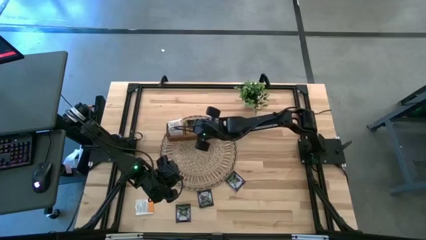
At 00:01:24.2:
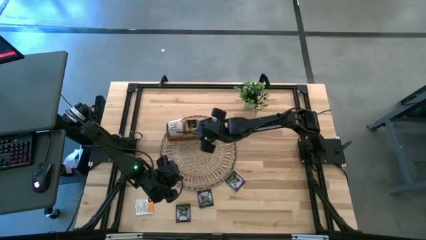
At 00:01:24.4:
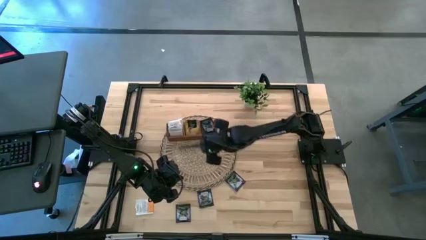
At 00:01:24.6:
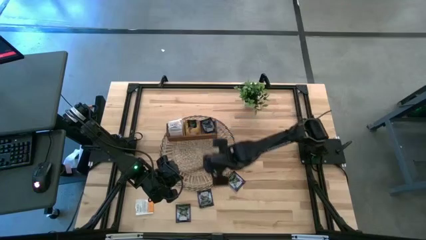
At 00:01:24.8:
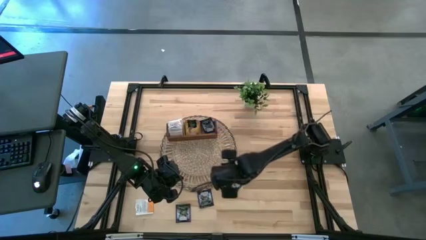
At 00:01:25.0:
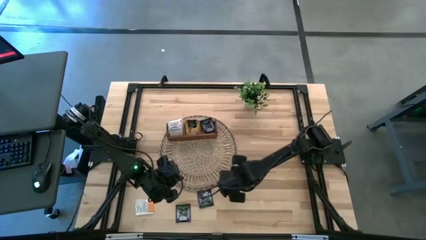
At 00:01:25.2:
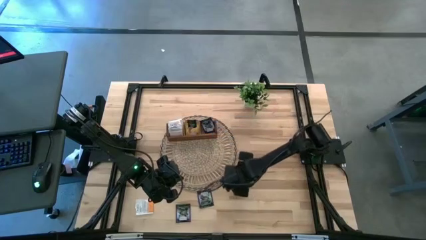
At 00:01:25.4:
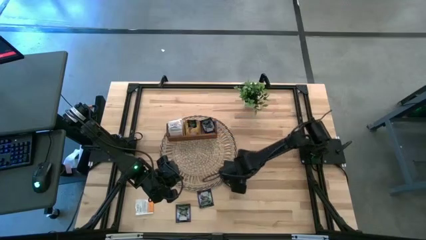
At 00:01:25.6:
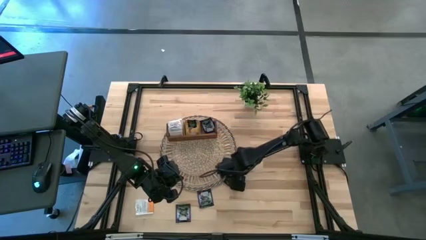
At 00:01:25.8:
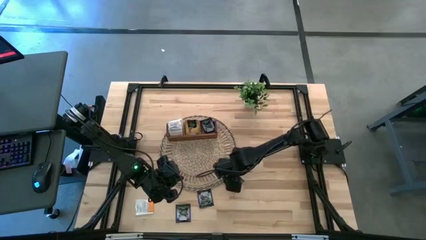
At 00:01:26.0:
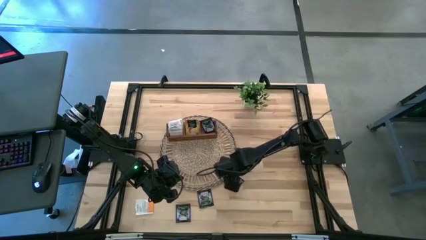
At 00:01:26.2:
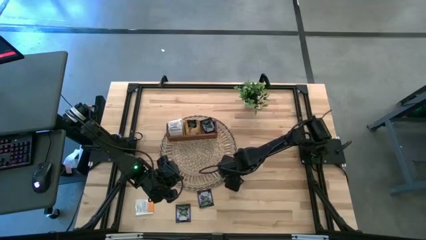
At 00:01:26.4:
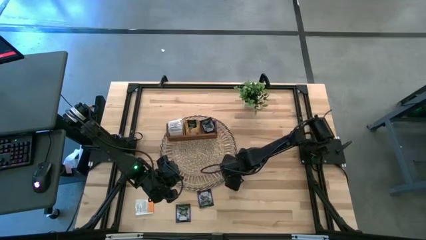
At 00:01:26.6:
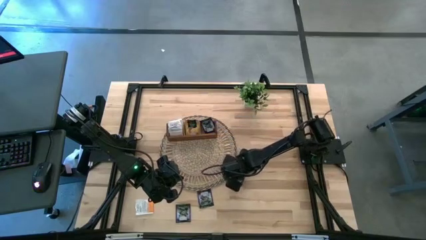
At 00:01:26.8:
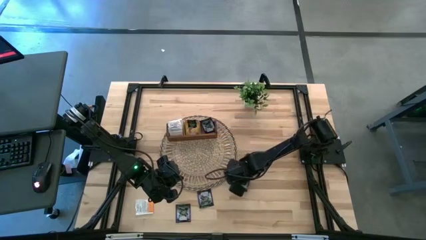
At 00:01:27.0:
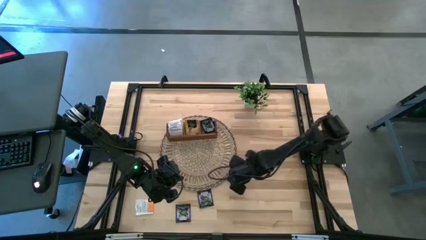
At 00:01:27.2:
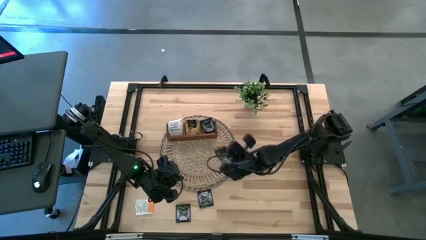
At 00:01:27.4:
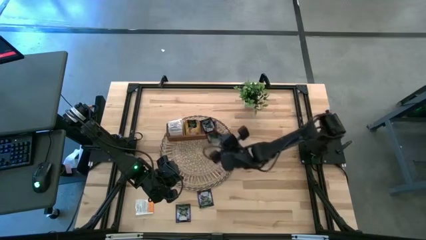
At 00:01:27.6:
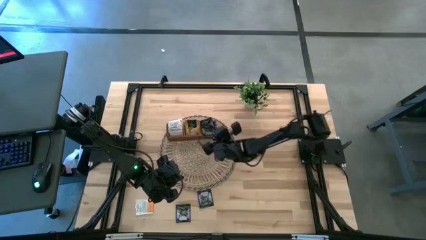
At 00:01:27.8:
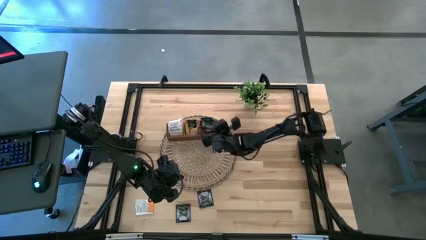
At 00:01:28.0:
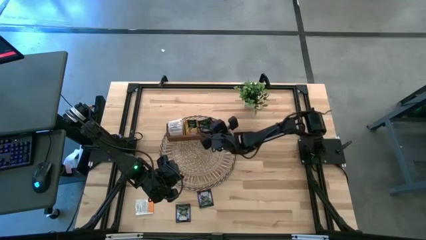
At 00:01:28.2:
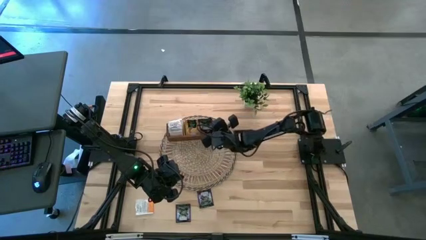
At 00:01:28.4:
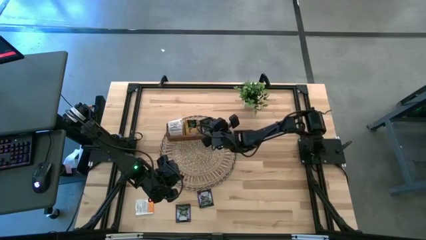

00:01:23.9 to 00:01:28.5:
Task: Pick & Place Tea
Put the violet tea packet into the right compartment of the wooden organizer

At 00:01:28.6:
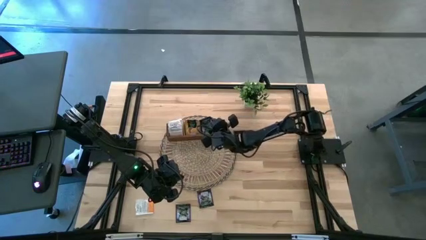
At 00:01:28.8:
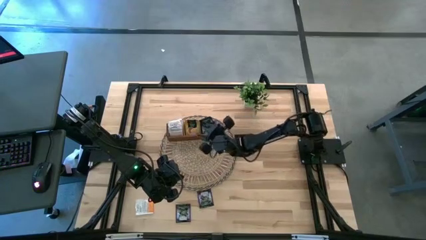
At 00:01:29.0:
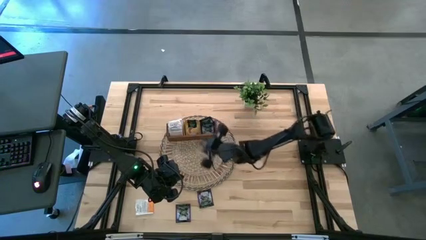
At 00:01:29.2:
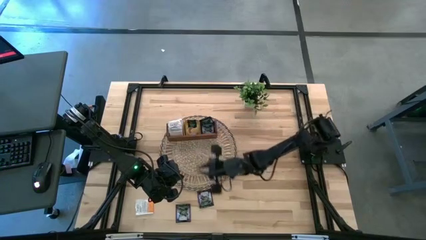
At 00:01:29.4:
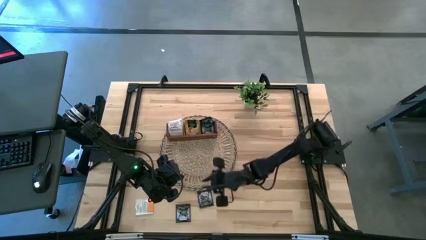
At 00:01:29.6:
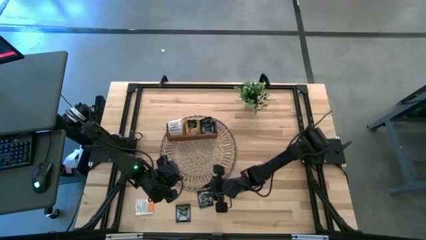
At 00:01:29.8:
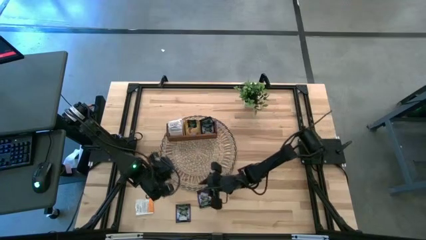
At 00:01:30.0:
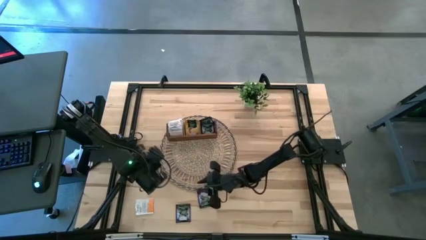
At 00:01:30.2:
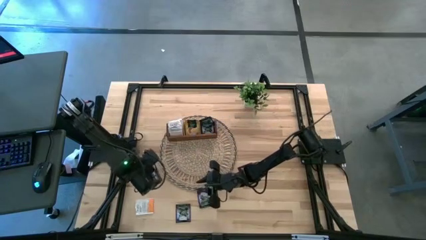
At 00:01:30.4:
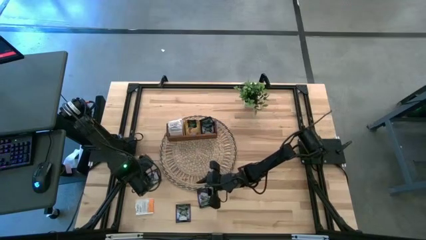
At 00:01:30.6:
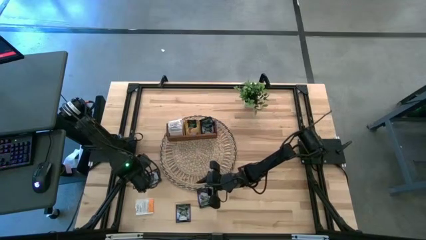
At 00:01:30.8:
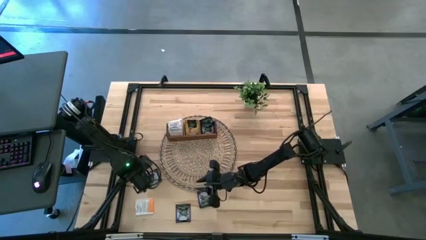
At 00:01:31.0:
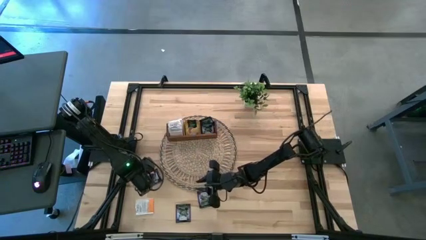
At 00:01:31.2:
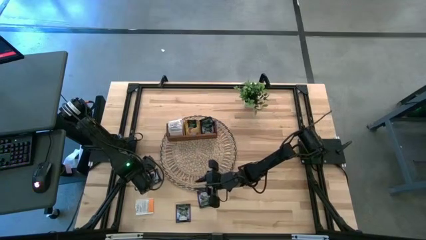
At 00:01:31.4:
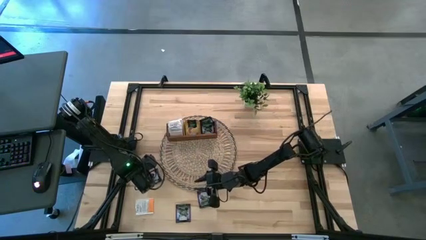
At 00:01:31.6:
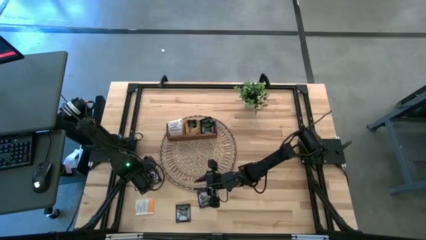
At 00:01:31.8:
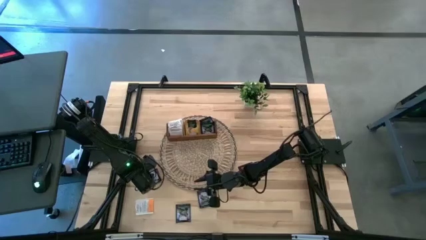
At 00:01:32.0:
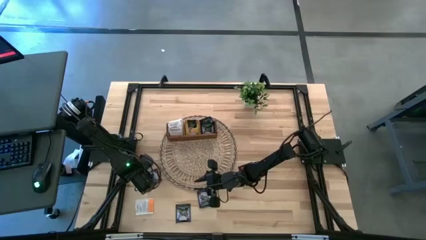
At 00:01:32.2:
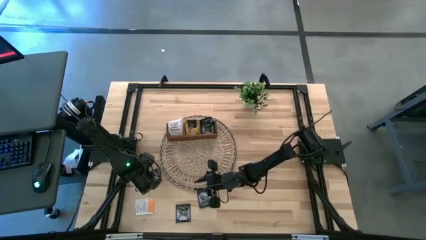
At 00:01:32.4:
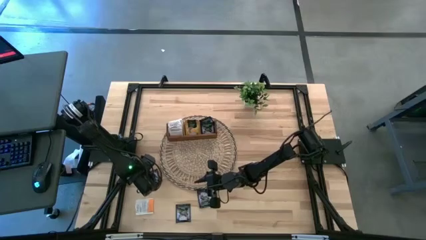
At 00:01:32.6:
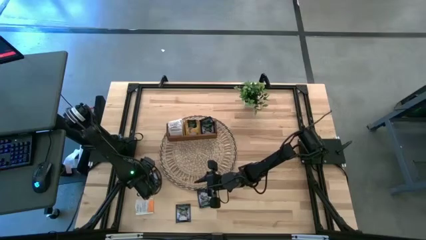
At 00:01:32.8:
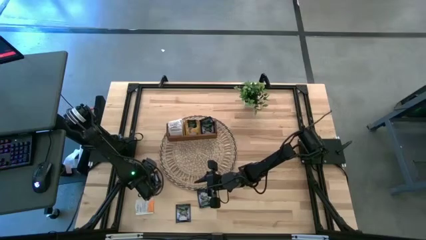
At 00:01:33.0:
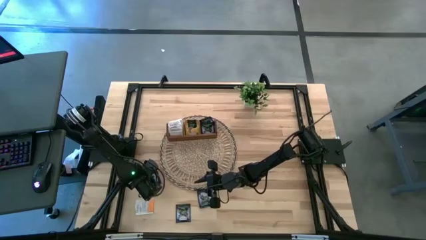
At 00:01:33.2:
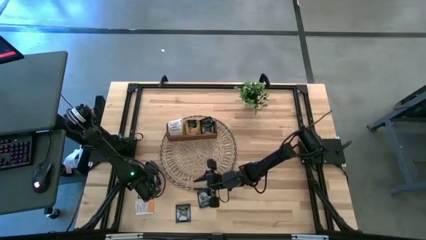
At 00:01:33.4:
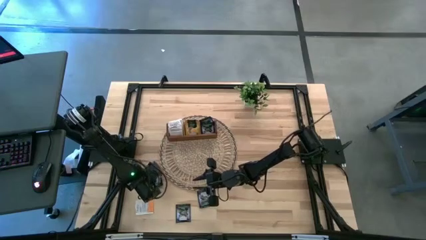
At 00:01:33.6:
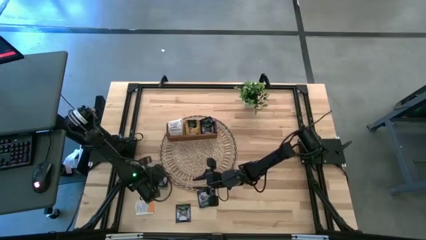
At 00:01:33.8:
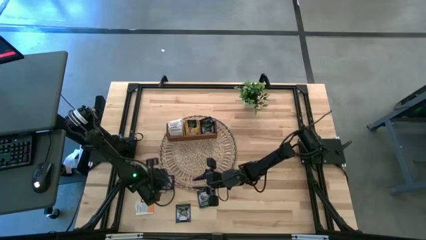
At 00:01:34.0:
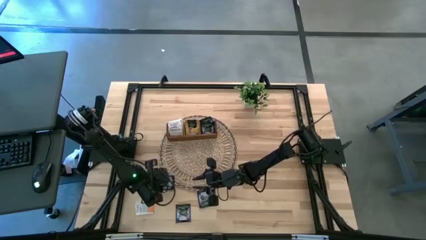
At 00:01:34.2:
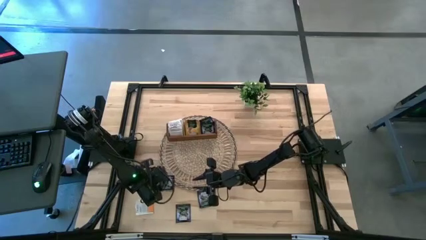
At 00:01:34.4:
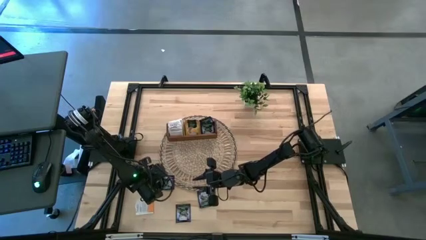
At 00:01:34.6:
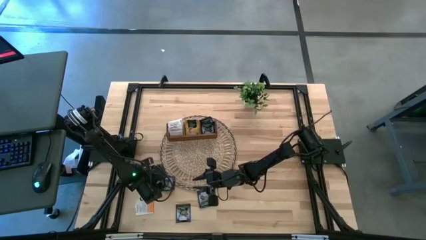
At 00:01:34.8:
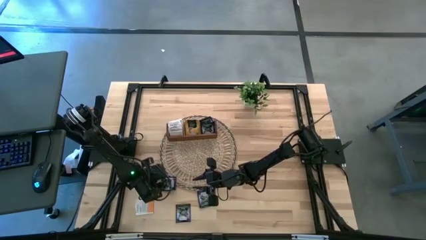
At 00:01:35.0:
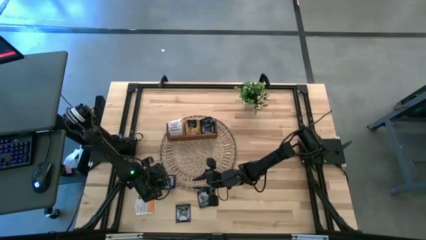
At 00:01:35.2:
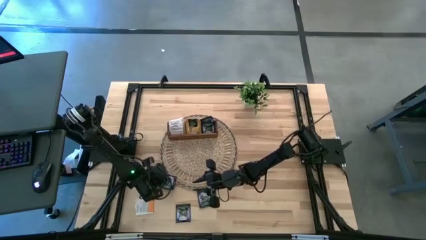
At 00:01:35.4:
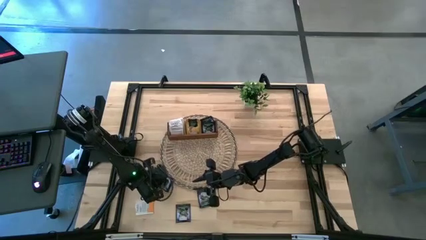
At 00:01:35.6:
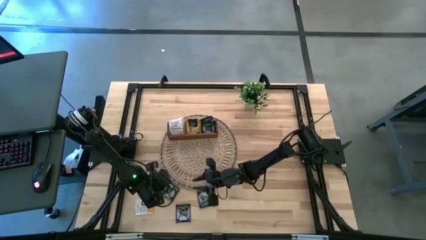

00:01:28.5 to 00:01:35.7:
Put the violet tea packet into the right compartment of the wooden organizer

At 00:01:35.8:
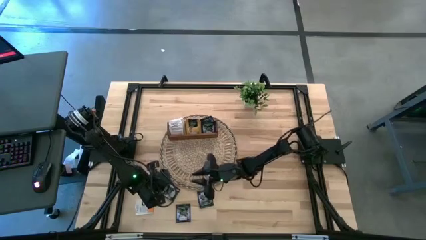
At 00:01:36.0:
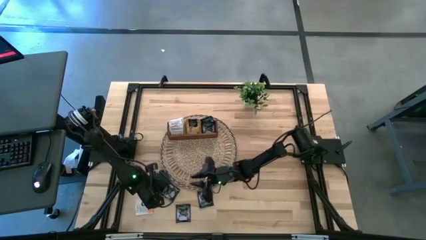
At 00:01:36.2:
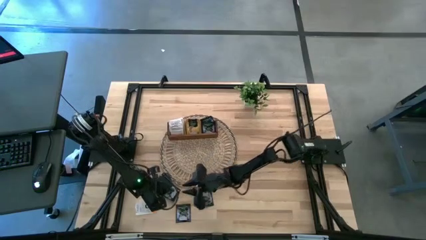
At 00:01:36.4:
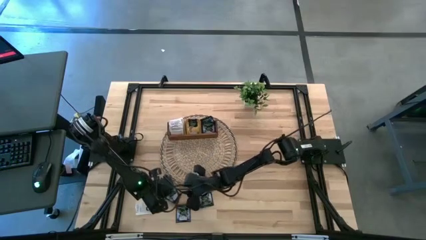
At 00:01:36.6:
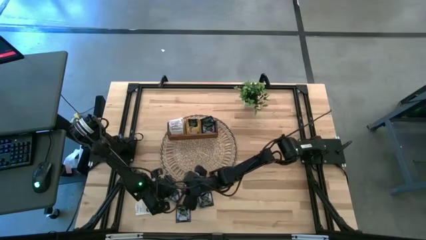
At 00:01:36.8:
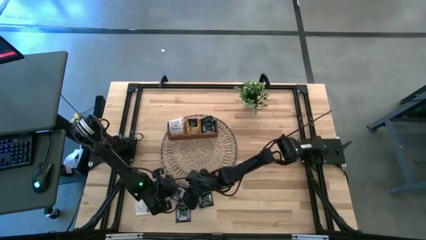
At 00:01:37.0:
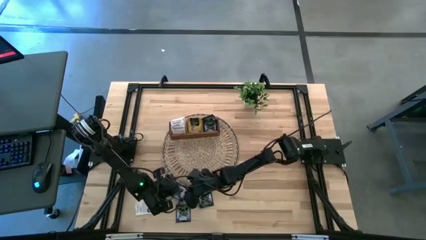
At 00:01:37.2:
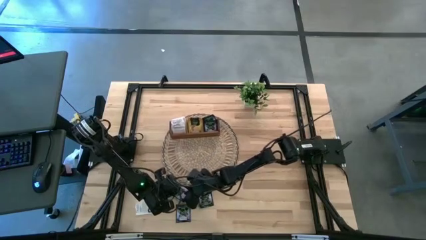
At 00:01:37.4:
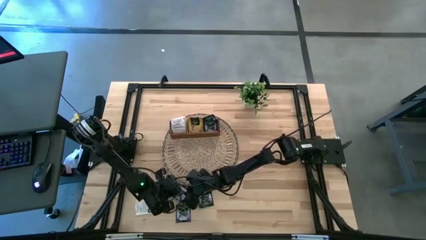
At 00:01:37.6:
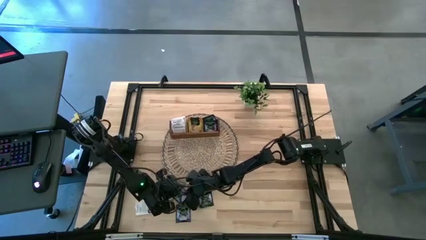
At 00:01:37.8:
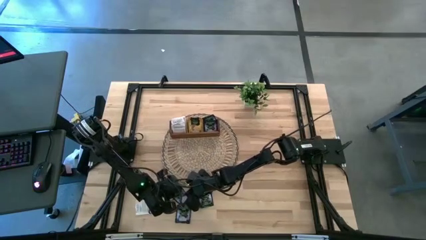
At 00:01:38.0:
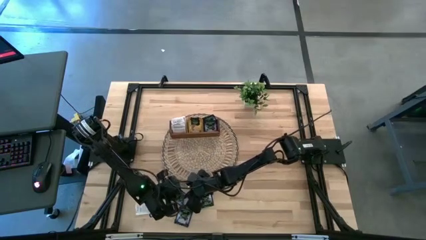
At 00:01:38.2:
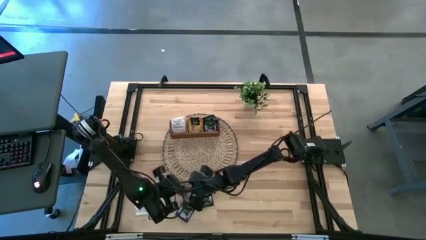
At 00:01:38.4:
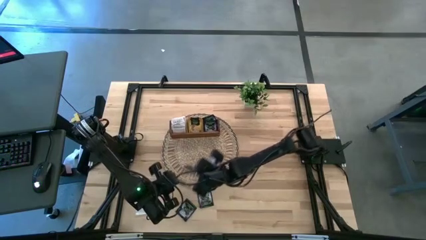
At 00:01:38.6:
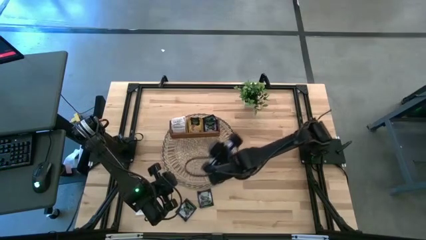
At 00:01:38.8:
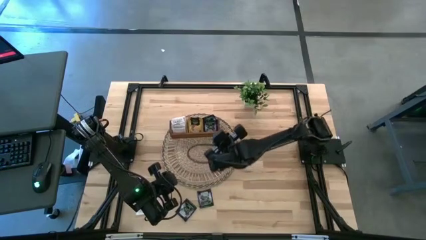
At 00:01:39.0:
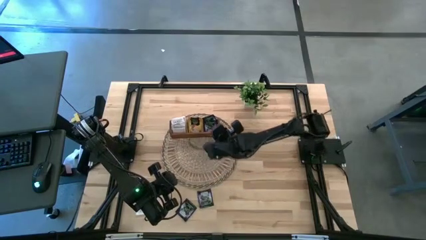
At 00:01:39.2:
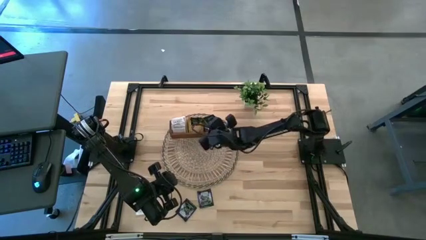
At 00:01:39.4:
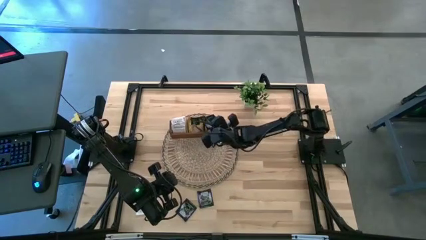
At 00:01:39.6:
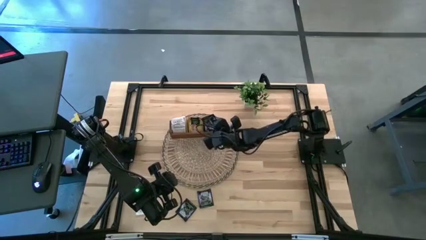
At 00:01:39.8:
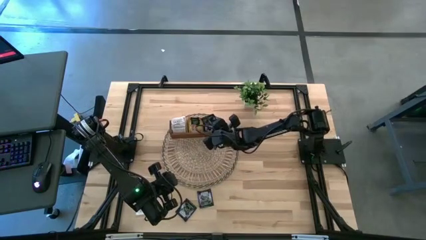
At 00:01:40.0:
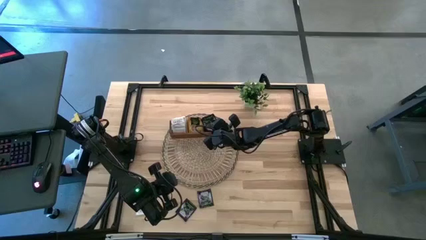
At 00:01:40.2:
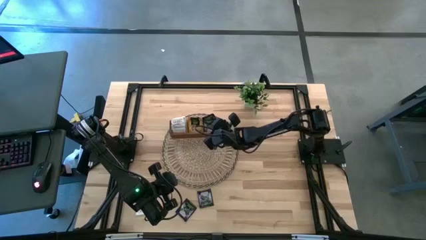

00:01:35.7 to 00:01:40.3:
Put the violet tea packet into the right compartment of the wooden organizer
